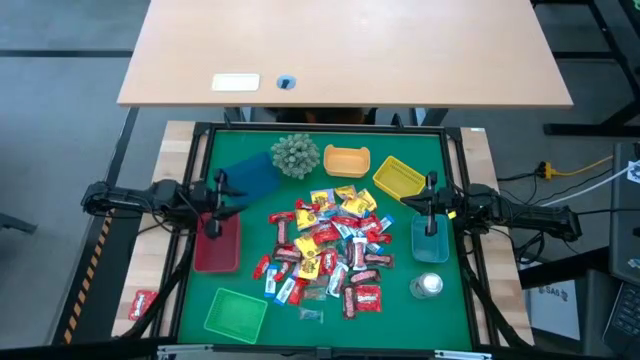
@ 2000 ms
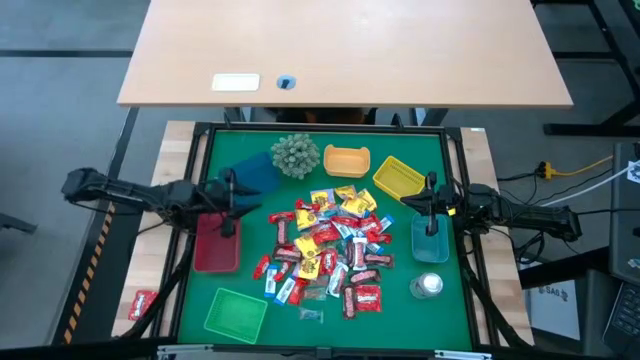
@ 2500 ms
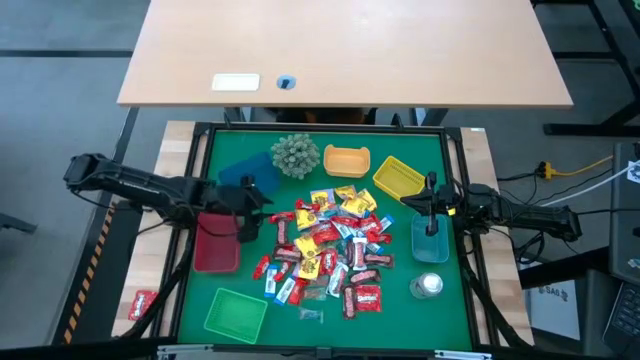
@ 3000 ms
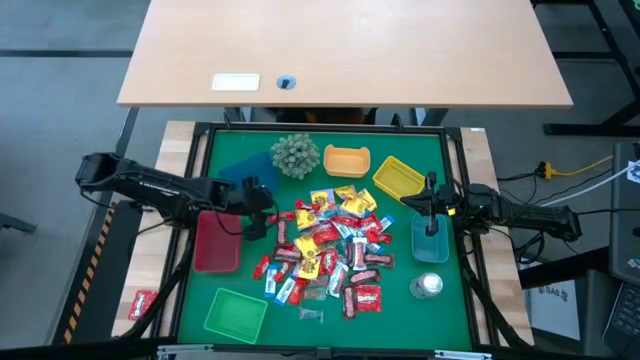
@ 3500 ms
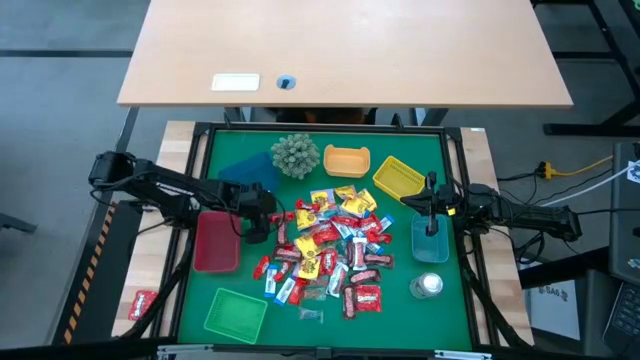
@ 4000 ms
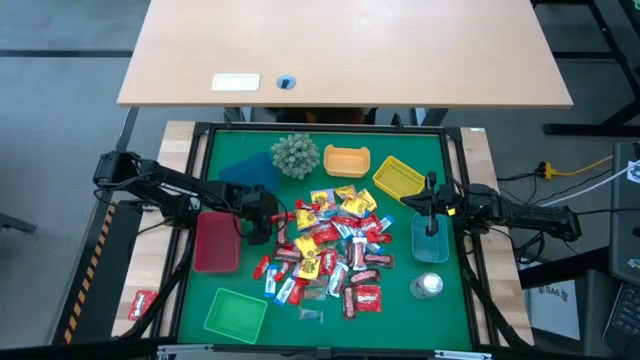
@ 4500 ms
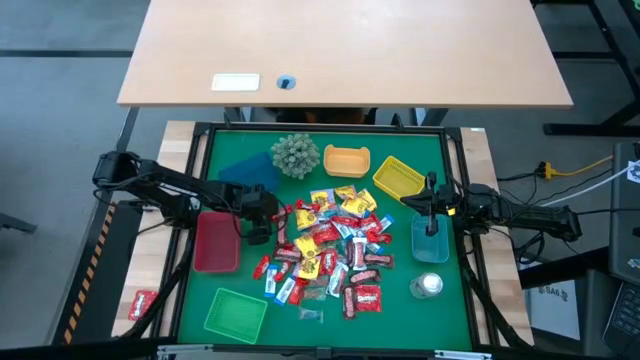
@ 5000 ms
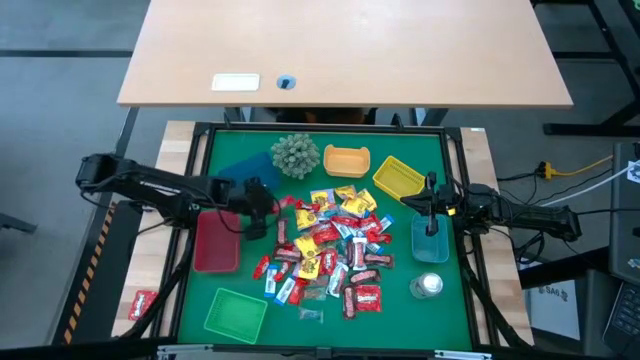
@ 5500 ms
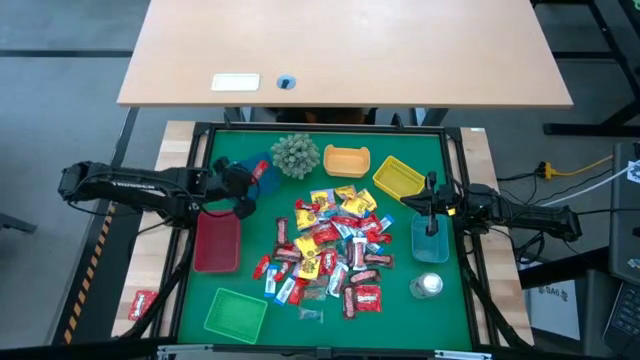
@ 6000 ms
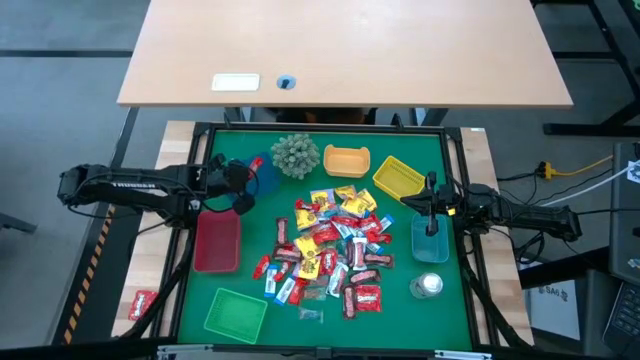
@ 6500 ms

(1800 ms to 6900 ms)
Task: Sort candy
Put the red chocolate into the blue bin

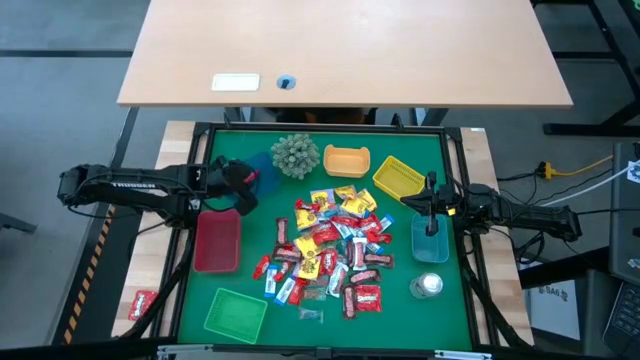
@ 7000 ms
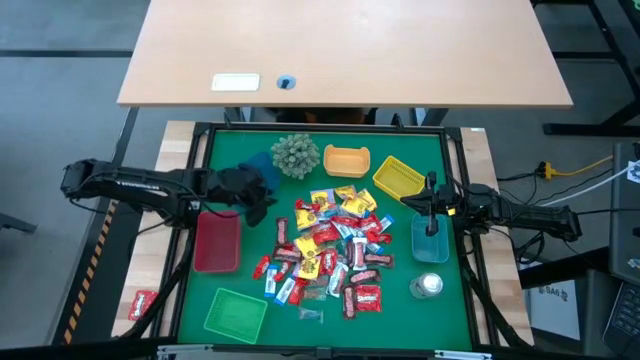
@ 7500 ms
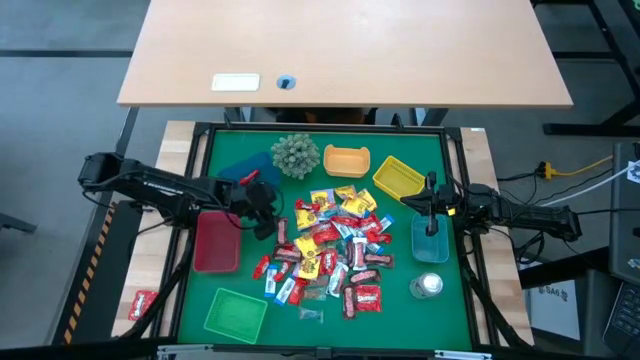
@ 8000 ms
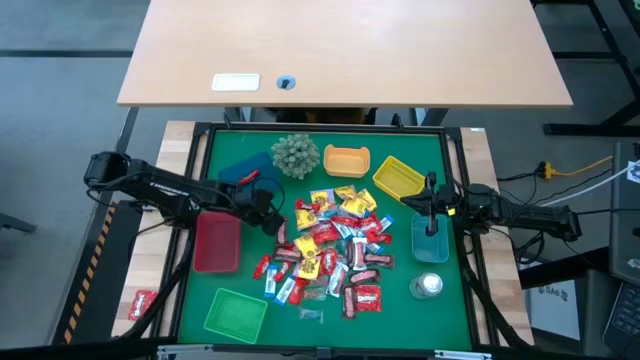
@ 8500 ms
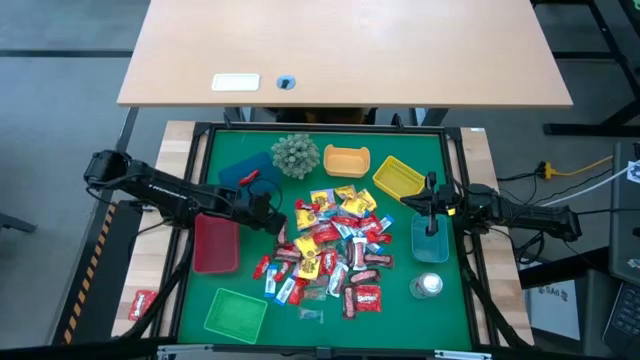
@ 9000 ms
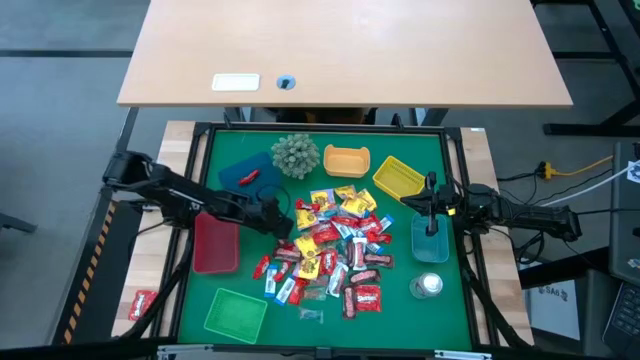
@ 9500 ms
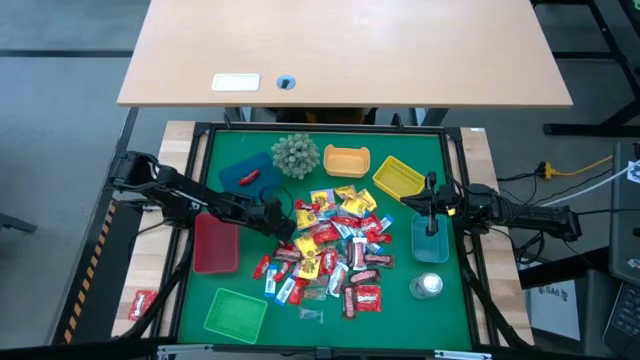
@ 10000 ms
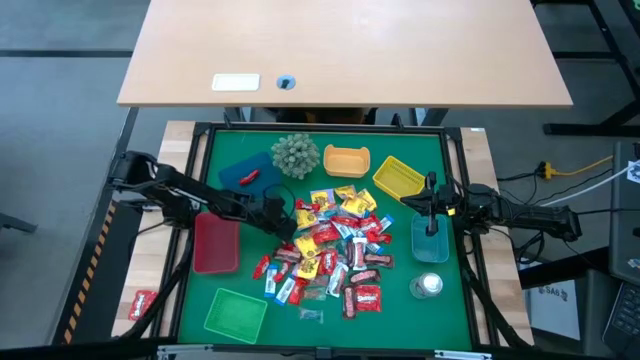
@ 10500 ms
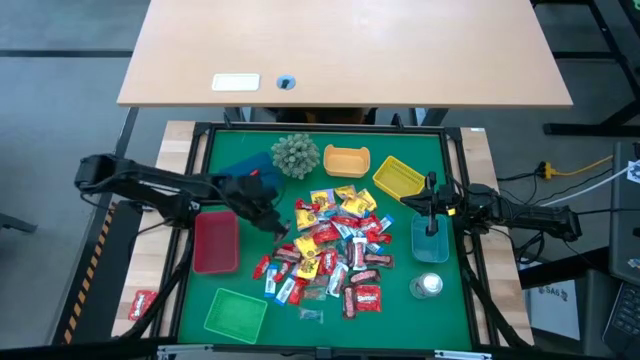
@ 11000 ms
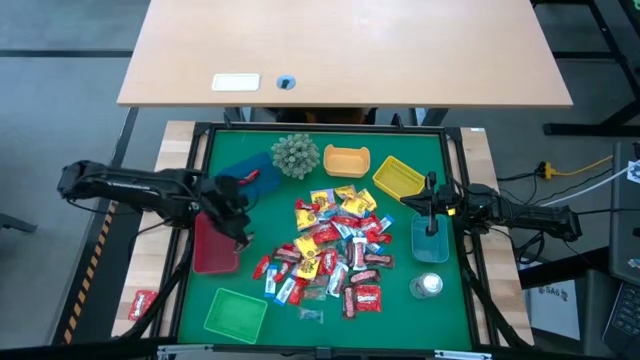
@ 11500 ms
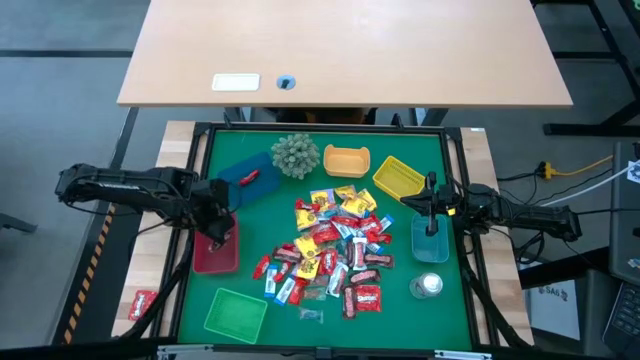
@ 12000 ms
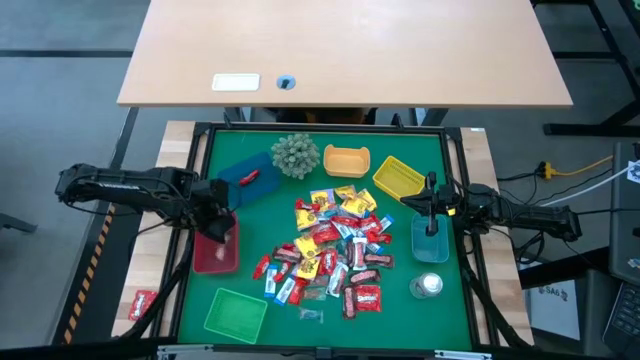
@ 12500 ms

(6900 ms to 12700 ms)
Put the brown chocolate into the red bin

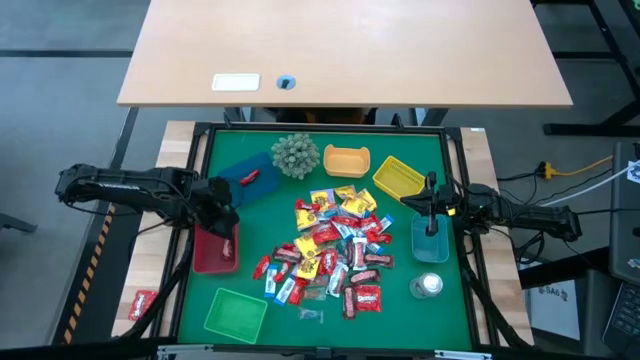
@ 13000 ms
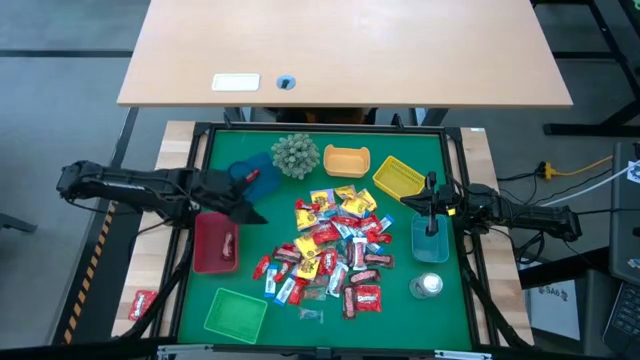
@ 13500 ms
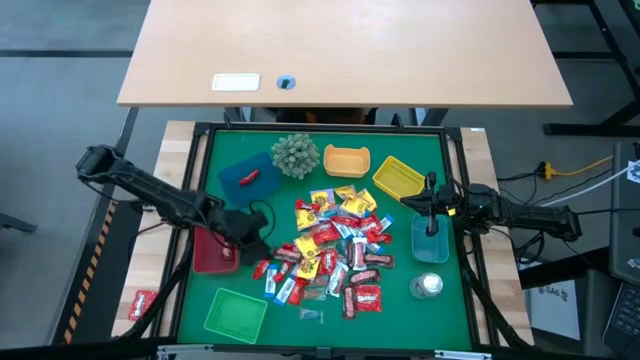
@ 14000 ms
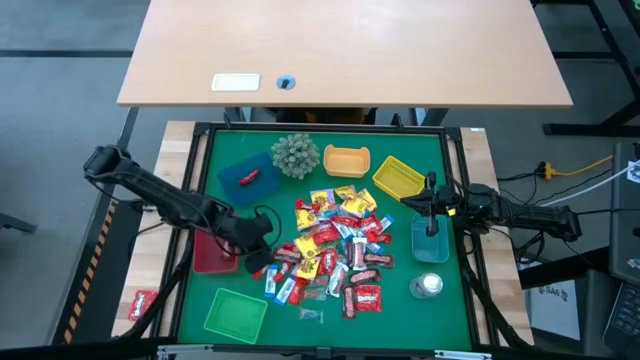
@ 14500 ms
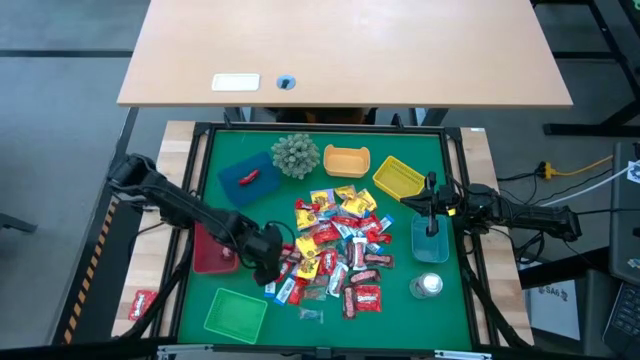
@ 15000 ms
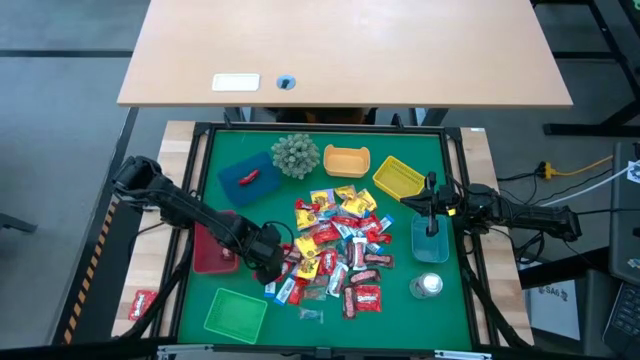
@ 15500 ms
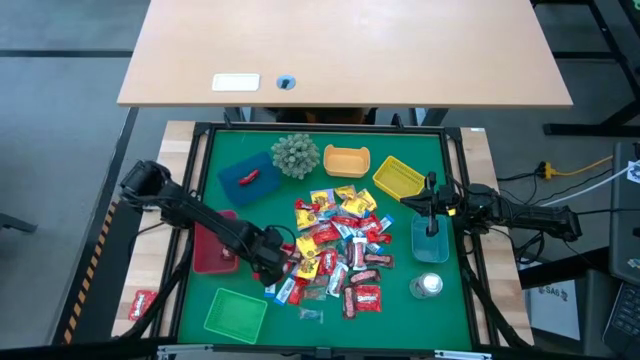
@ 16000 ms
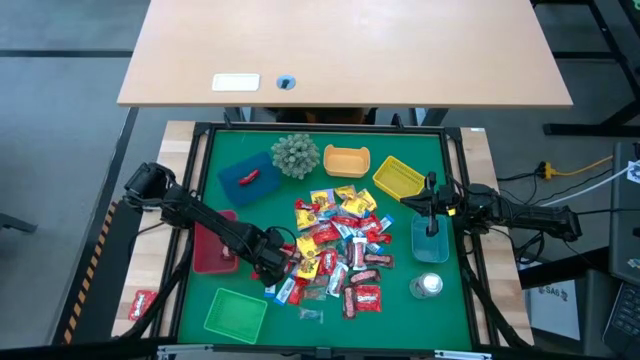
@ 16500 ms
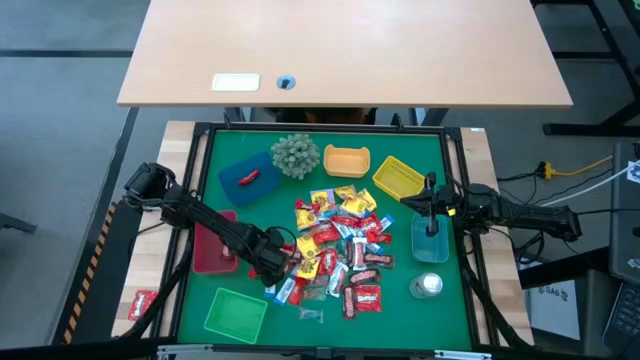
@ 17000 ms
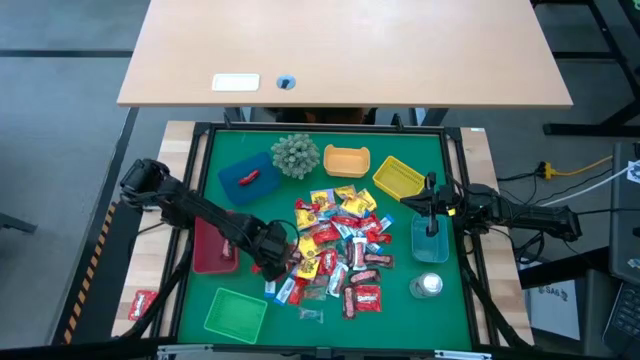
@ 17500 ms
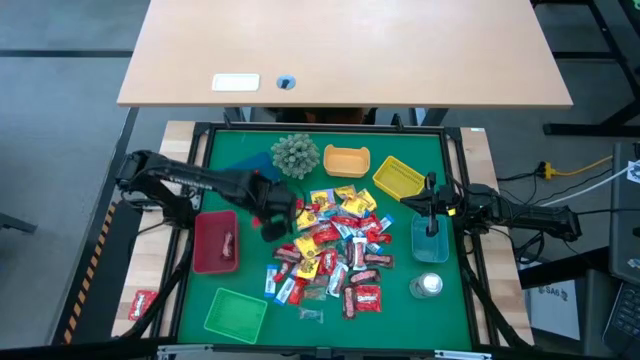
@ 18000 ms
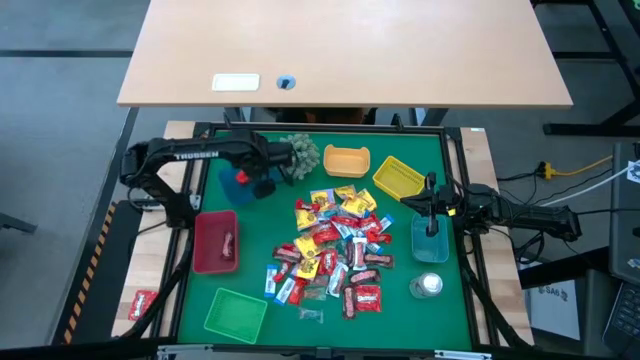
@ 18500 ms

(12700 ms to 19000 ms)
Put the red chocolate into the blue bin

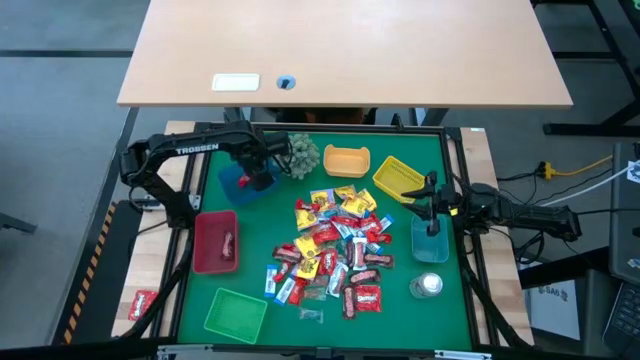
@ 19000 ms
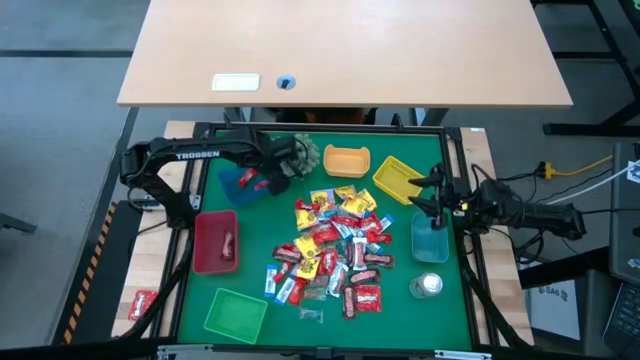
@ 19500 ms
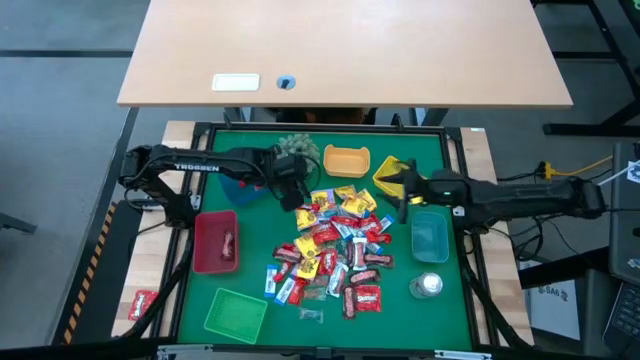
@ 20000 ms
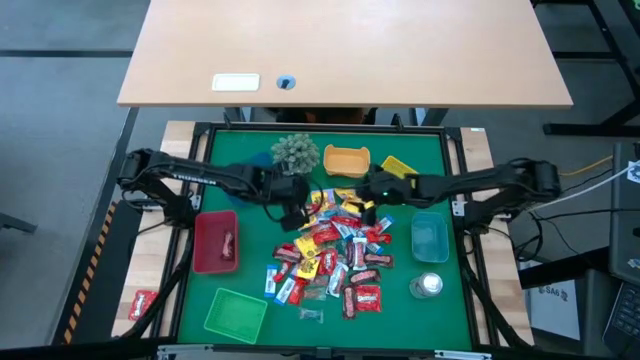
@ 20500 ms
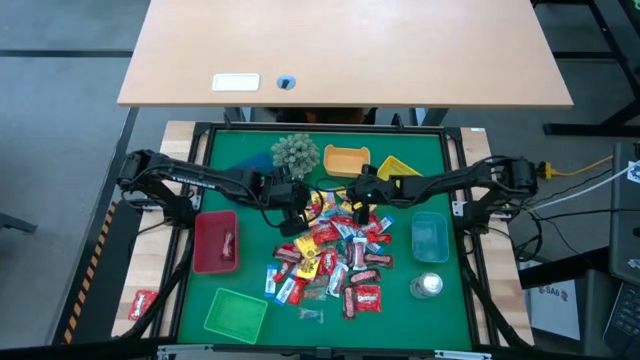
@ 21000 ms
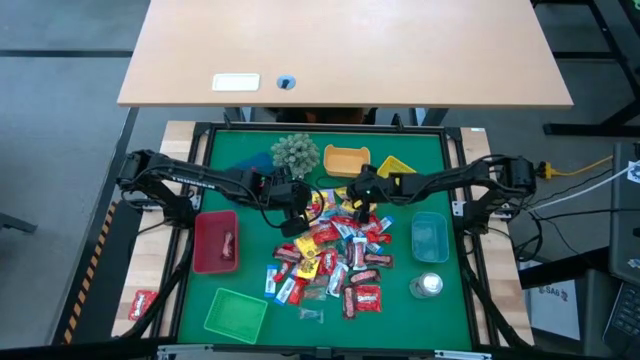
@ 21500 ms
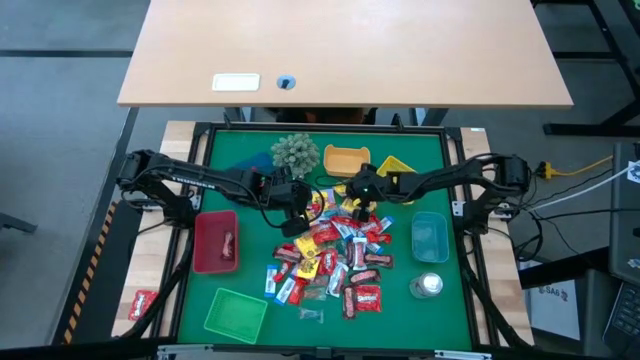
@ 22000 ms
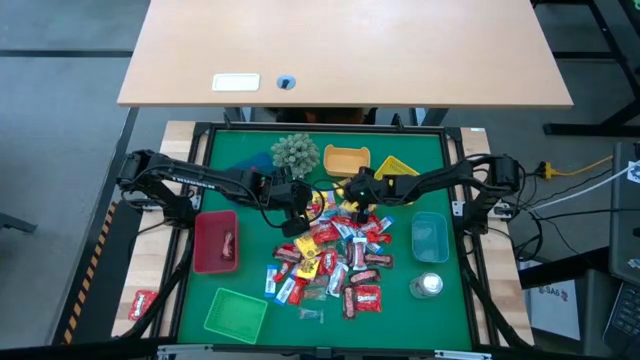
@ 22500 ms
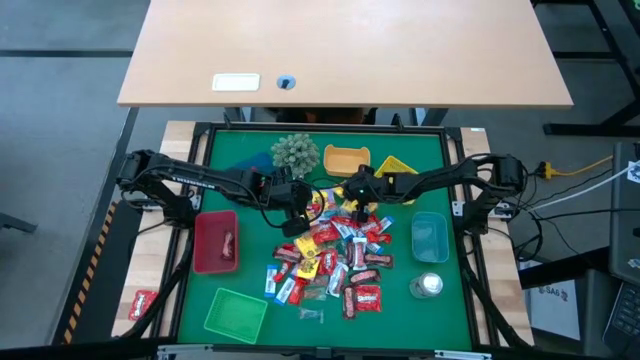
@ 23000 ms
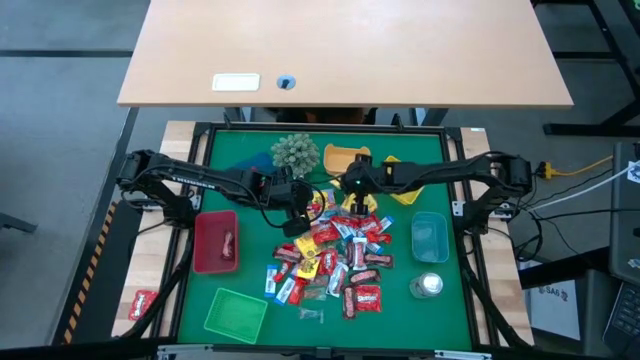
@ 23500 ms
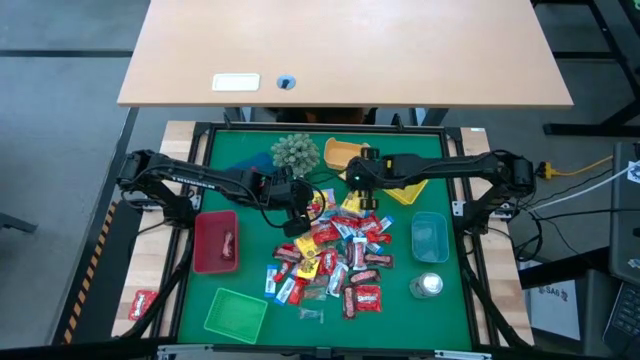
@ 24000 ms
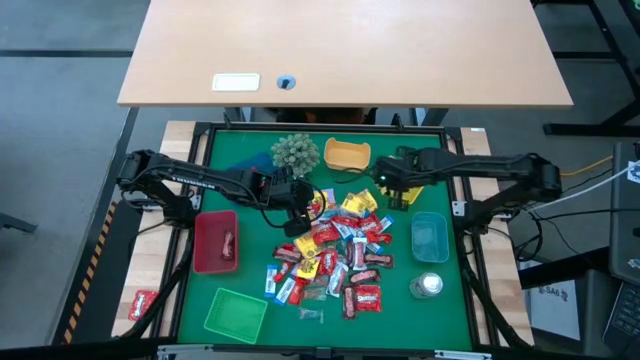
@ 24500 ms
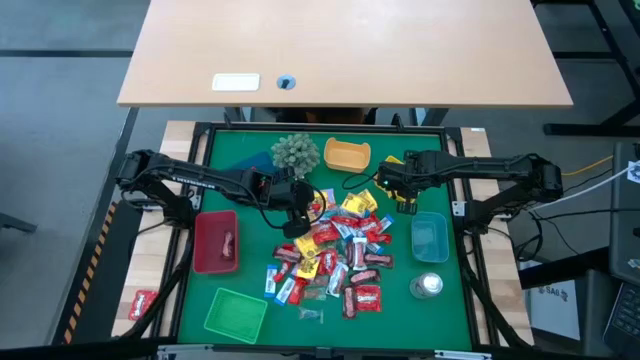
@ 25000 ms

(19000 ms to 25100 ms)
Put the yellow candy into the yellow bin
